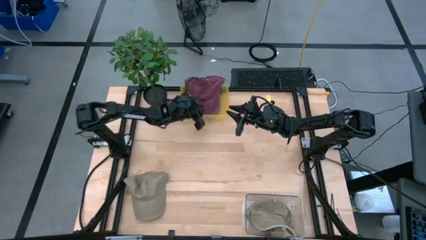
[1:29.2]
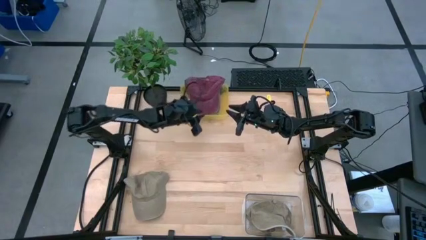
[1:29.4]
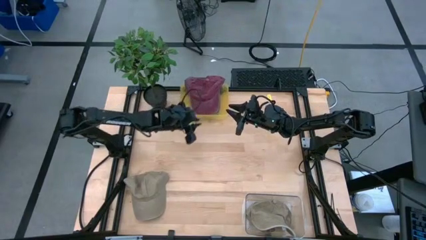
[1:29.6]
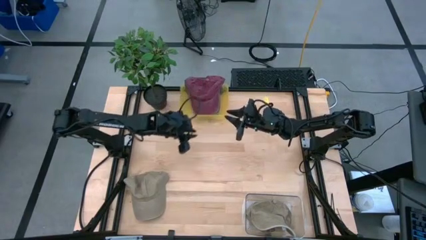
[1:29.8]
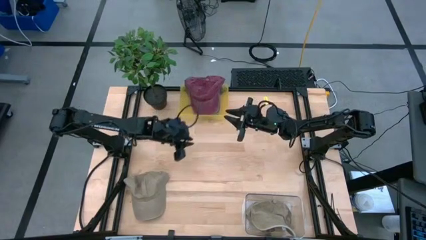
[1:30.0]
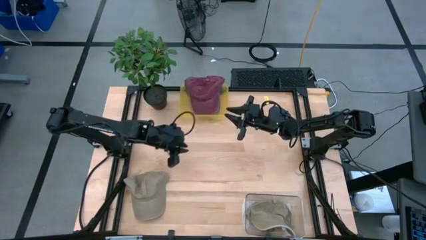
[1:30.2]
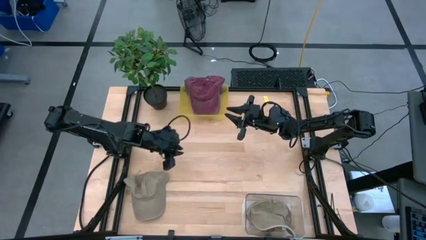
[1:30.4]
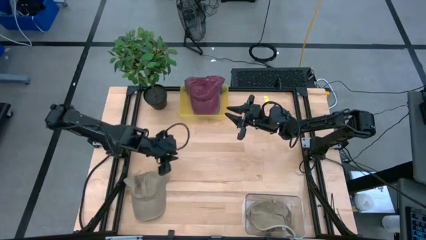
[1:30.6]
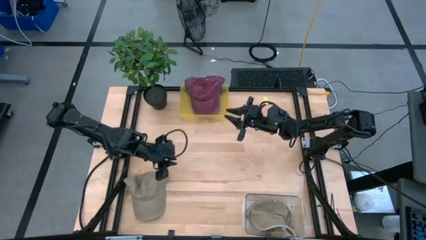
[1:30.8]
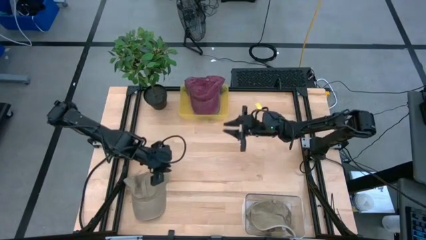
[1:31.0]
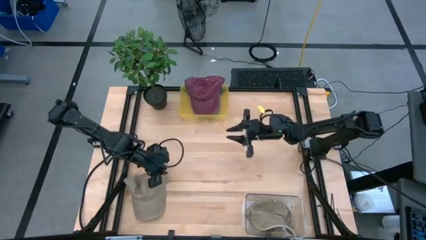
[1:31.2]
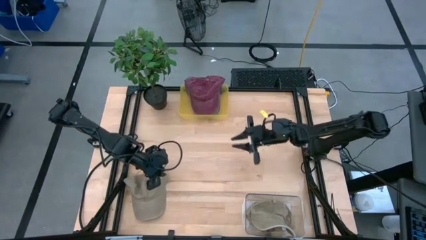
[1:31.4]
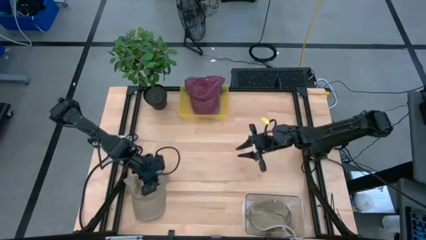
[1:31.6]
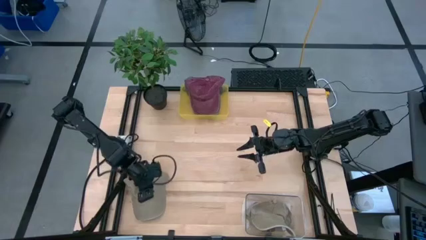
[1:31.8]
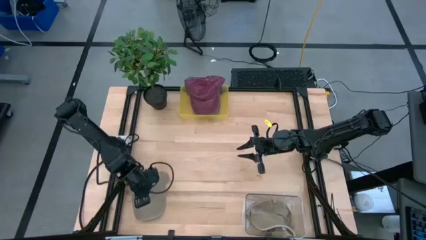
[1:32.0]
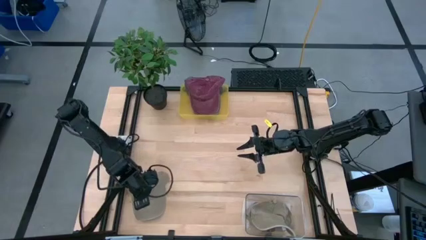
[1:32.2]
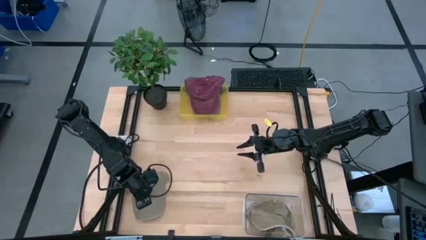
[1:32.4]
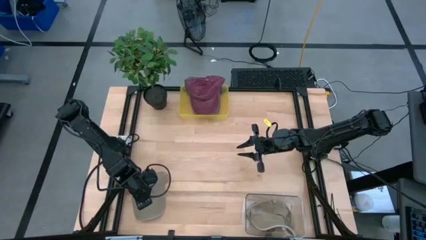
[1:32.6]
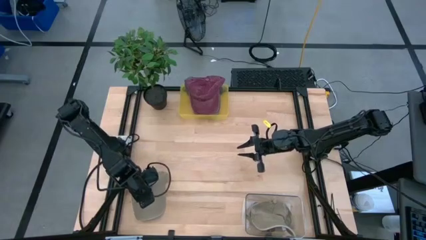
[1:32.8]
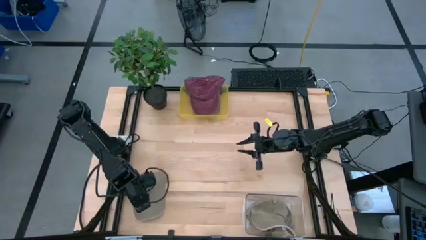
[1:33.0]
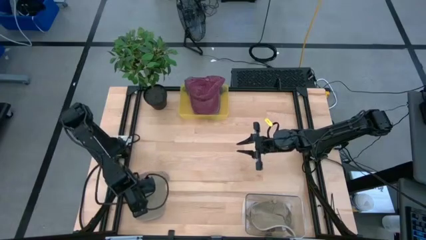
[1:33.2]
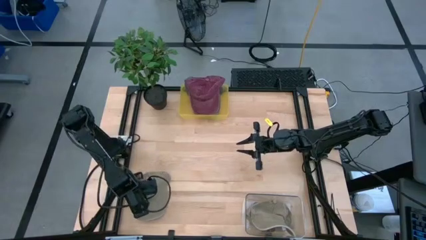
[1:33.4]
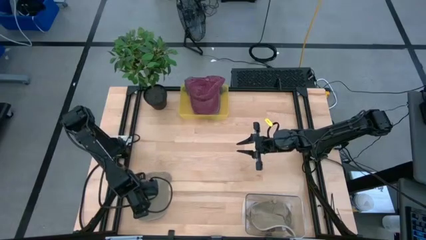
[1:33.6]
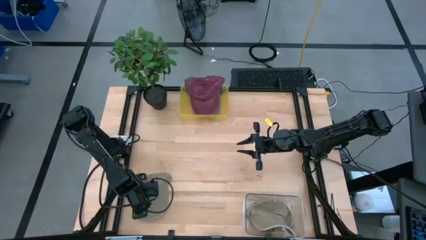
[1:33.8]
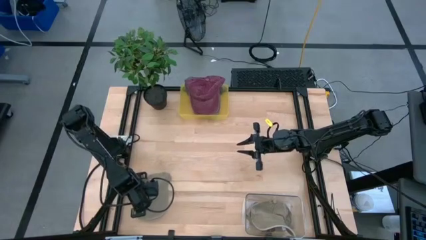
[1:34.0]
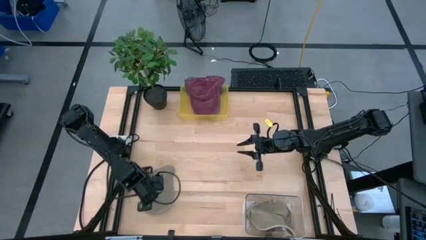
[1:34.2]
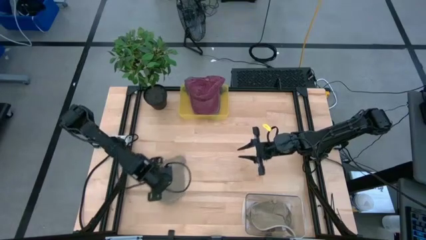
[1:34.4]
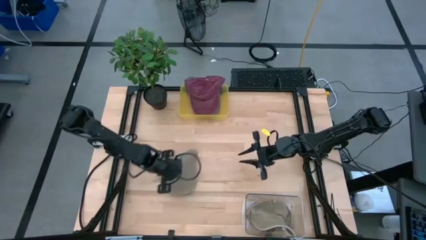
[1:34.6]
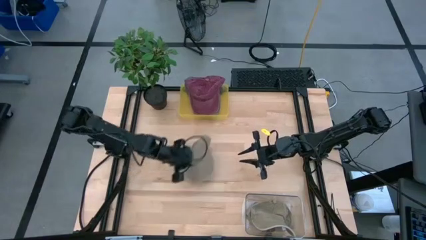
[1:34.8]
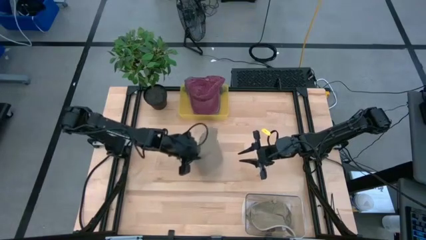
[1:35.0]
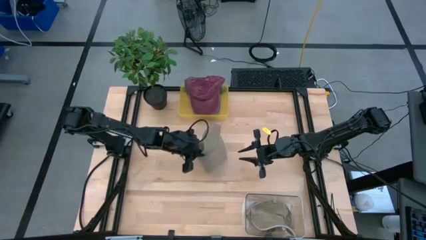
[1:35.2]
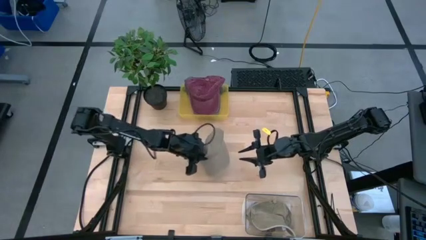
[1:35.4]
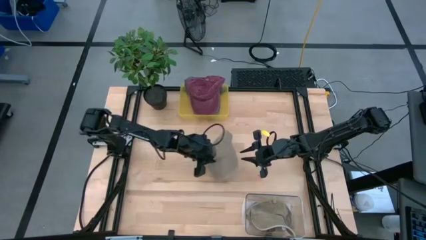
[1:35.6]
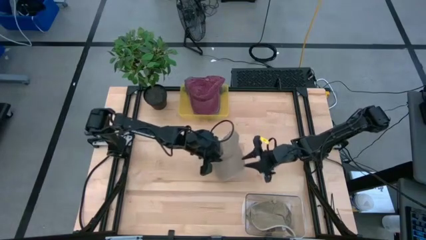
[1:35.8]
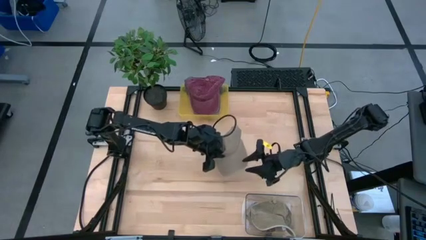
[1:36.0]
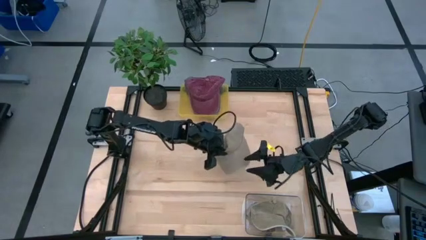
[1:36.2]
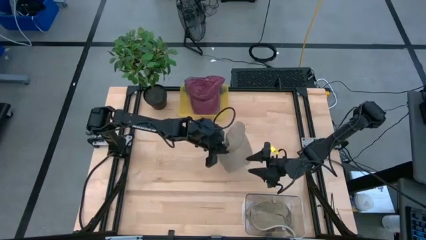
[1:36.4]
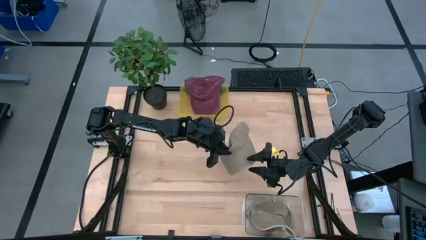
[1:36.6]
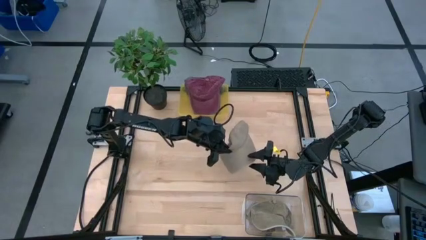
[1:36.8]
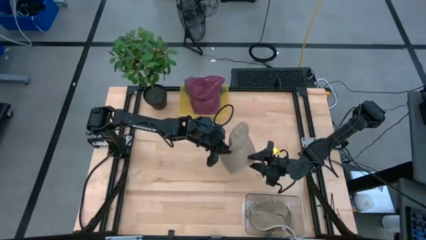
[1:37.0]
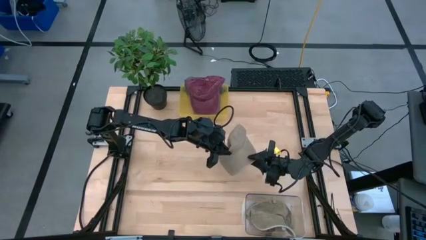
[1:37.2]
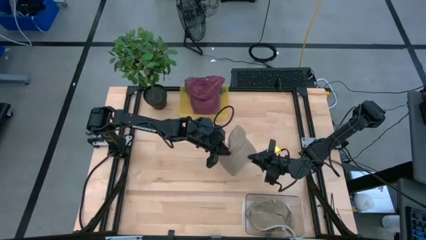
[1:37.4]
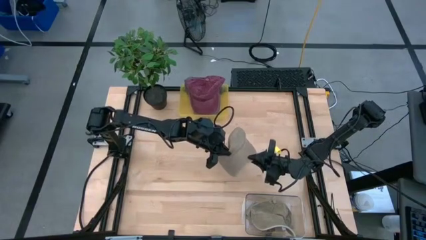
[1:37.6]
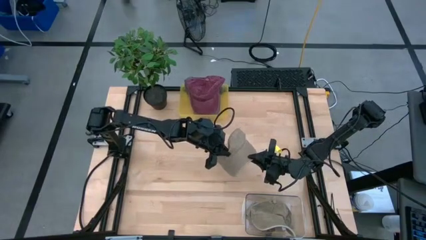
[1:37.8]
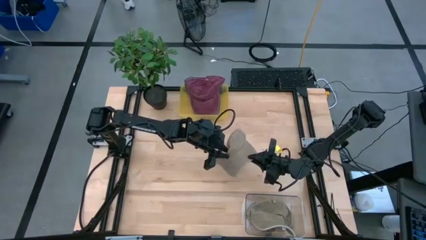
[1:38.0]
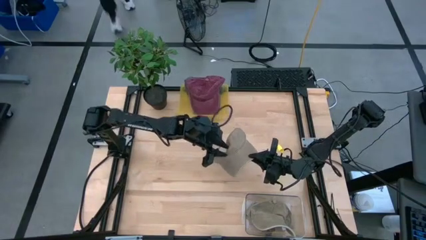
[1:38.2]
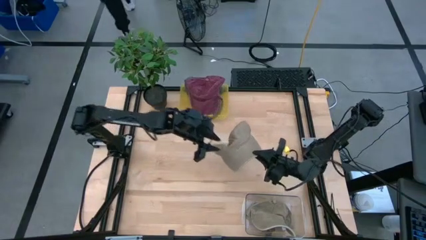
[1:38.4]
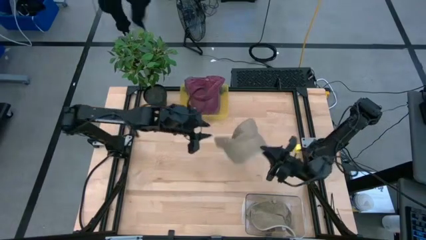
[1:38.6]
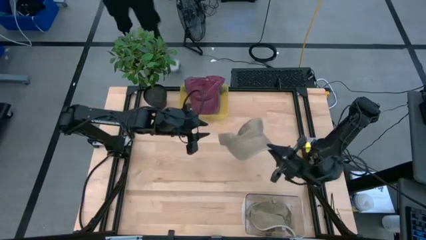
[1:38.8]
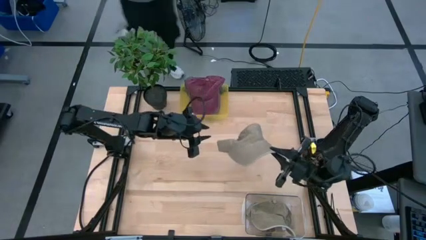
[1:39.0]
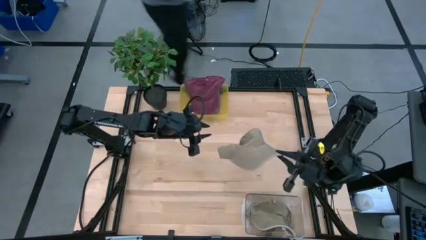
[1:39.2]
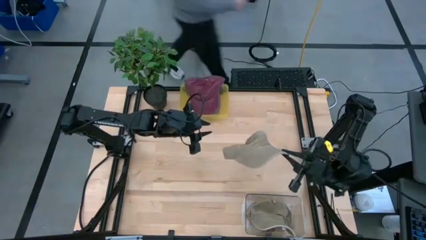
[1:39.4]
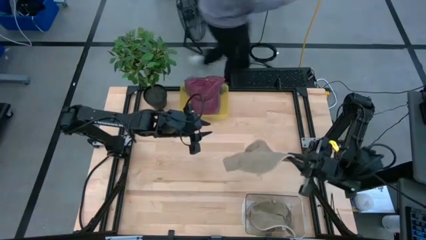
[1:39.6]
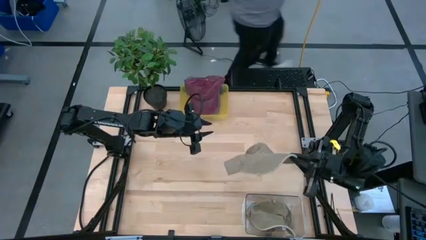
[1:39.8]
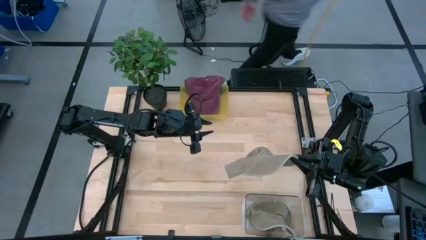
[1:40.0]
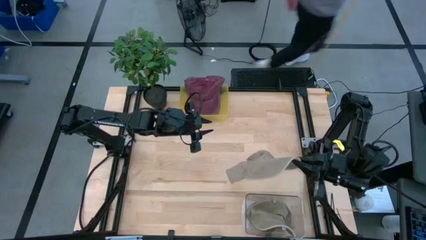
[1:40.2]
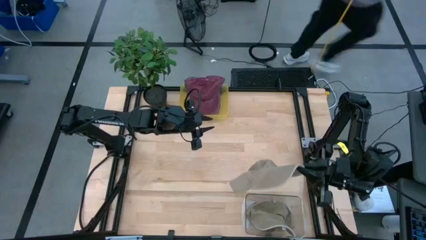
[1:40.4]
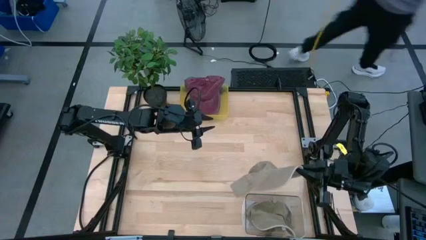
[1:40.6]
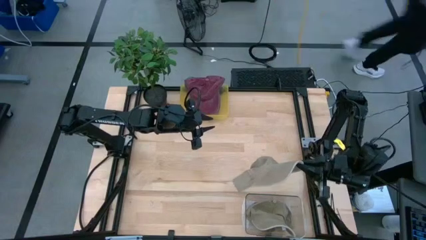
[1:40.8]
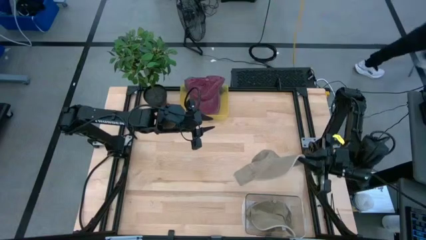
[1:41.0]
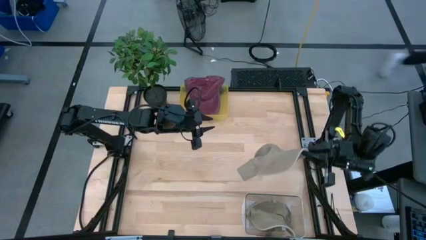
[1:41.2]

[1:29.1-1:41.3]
Task: Pick & Place hat
Put the brown cap into the transparent bin
